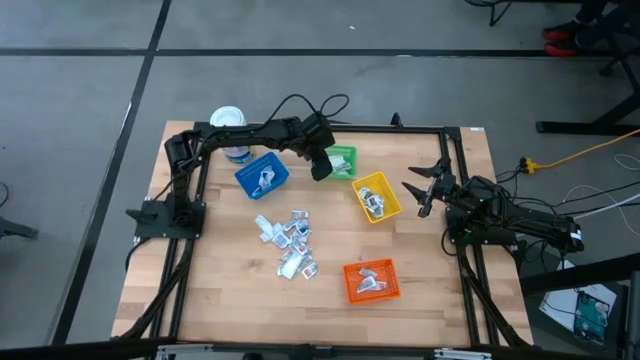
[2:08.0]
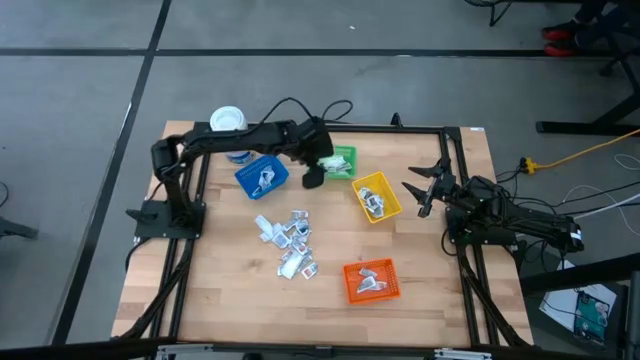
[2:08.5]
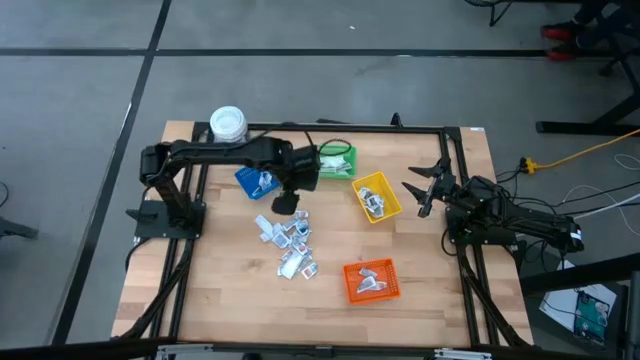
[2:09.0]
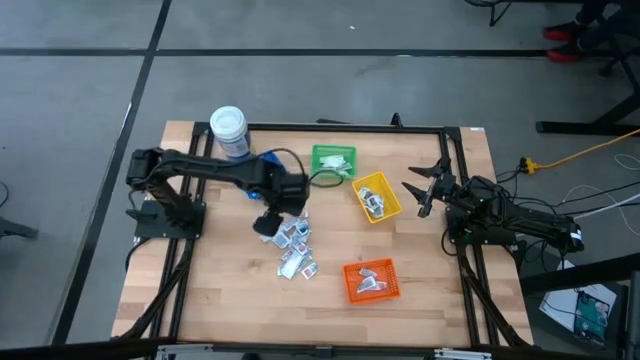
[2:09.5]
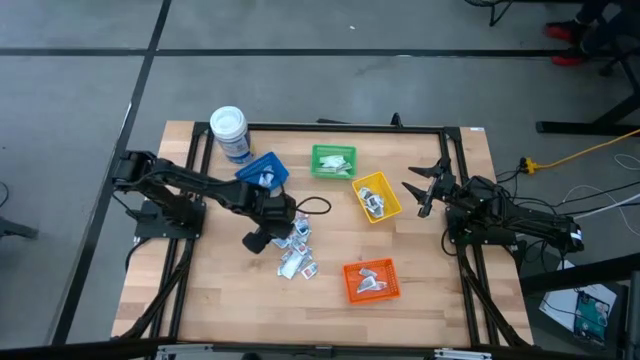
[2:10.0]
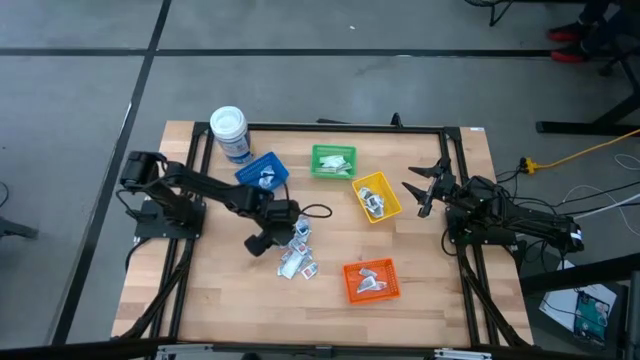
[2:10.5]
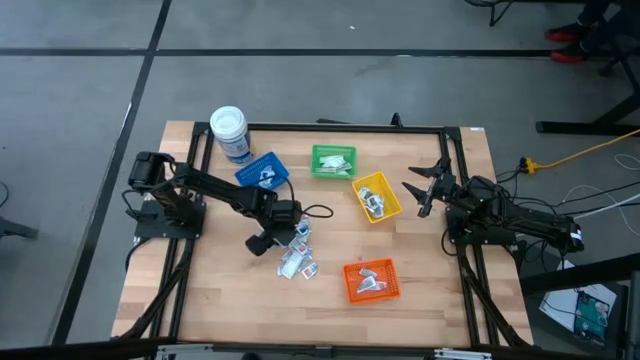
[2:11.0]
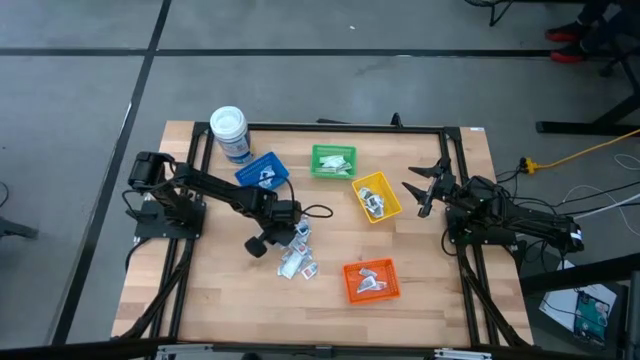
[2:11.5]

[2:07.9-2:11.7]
Task: Pick & Place First Aid Supplies
Put the white alcohol pad into the blue bin

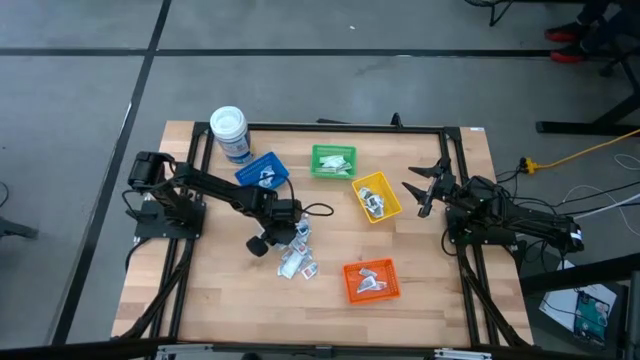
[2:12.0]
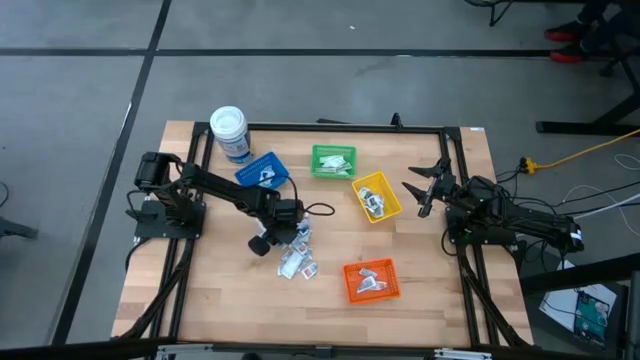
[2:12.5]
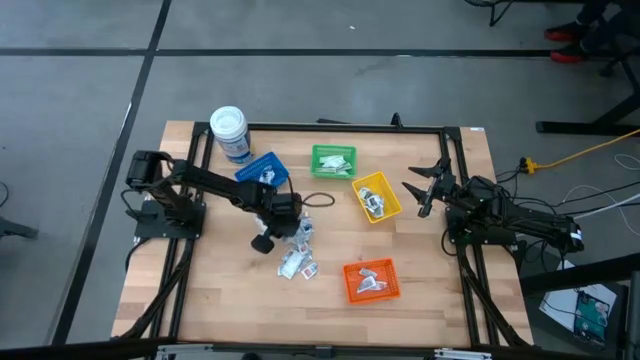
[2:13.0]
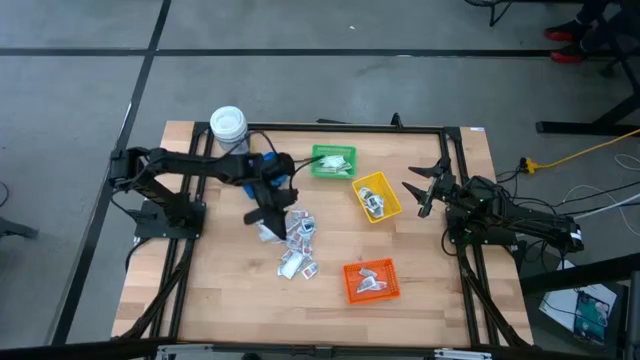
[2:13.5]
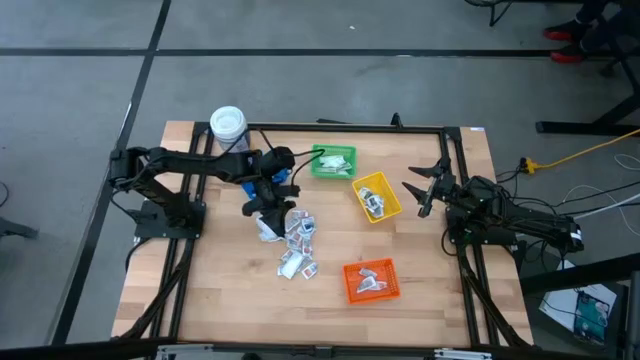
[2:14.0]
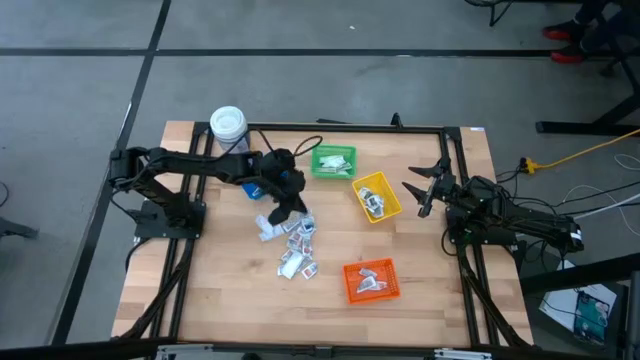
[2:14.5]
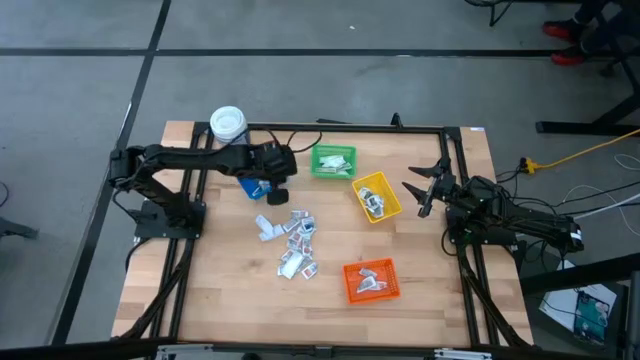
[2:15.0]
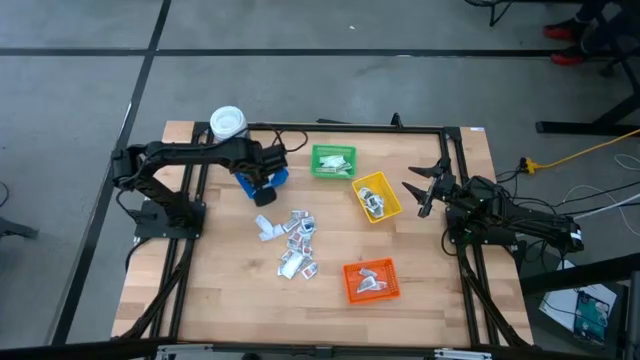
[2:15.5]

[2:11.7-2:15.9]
Put the white alcohol pad into the blue bin

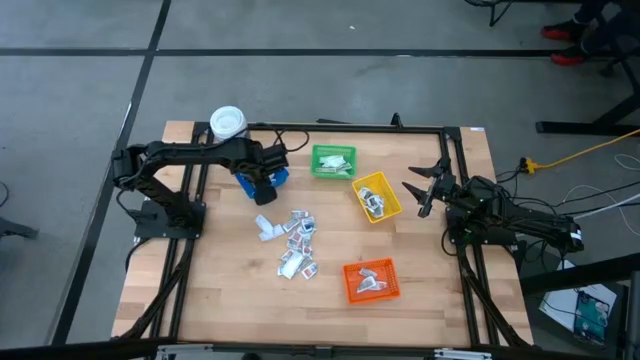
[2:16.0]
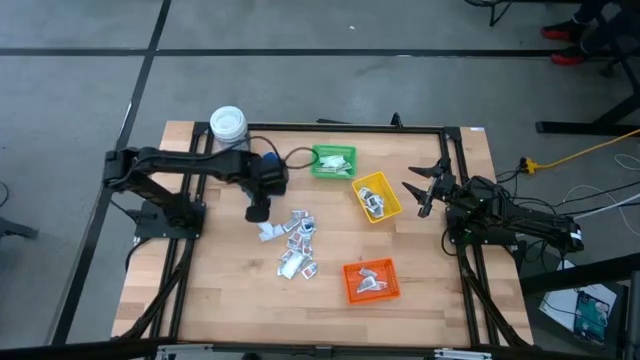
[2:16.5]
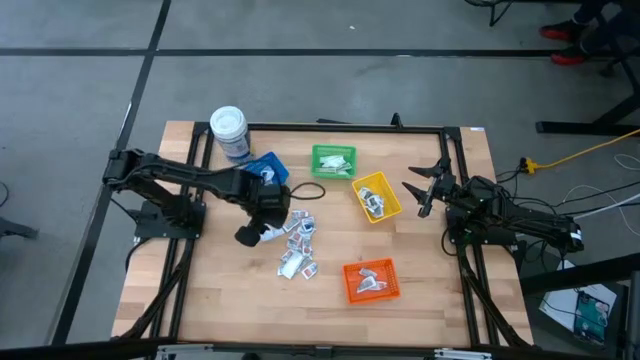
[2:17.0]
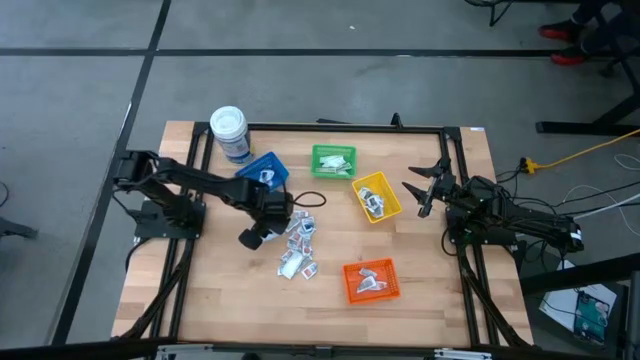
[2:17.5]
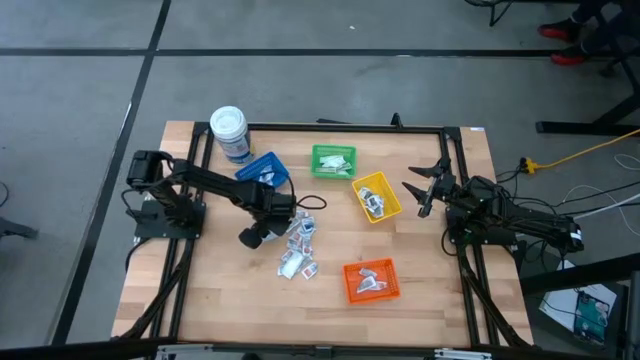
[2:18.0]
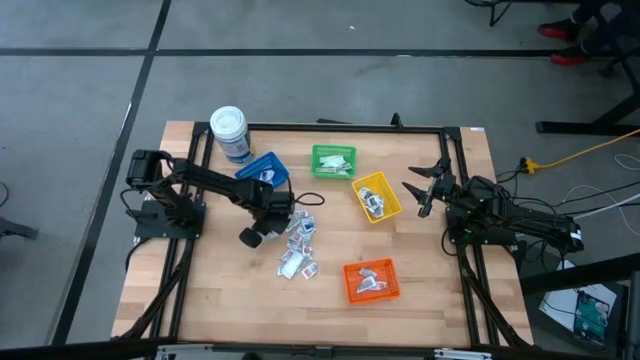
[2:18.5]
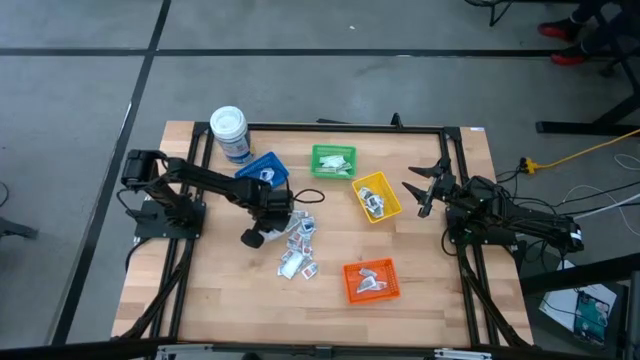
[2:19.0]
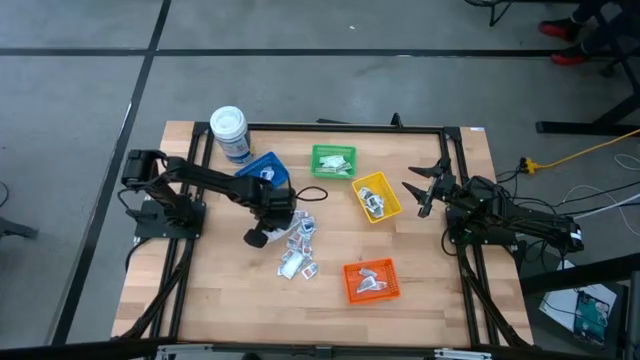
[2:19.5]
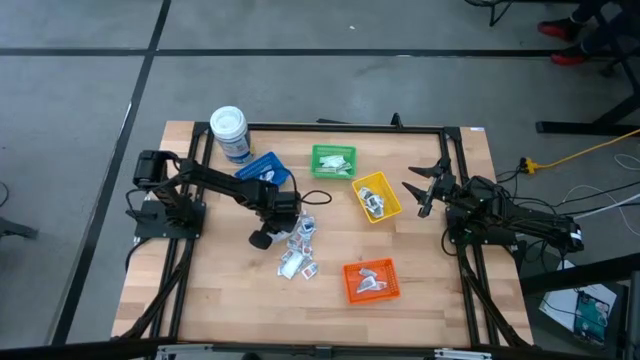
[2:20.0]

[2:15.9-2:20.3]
Put the white bandage into the green bin

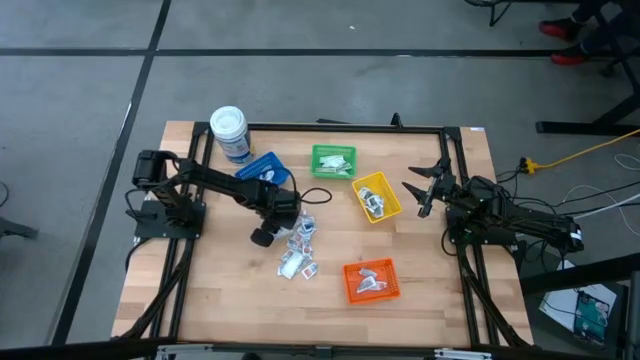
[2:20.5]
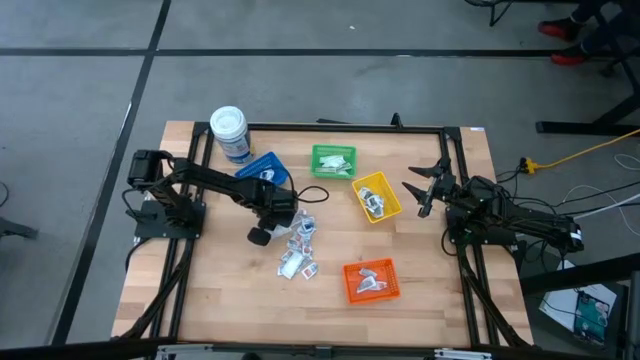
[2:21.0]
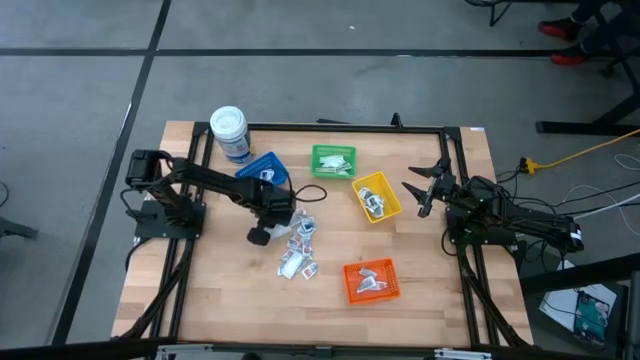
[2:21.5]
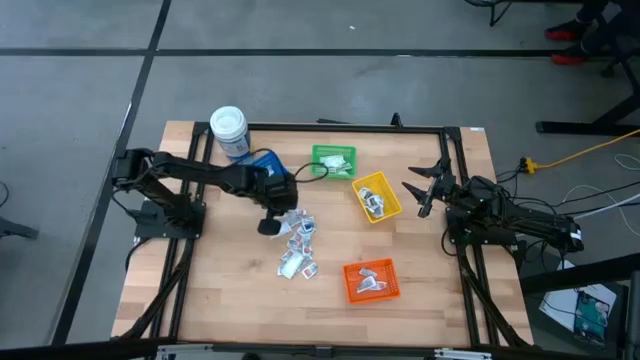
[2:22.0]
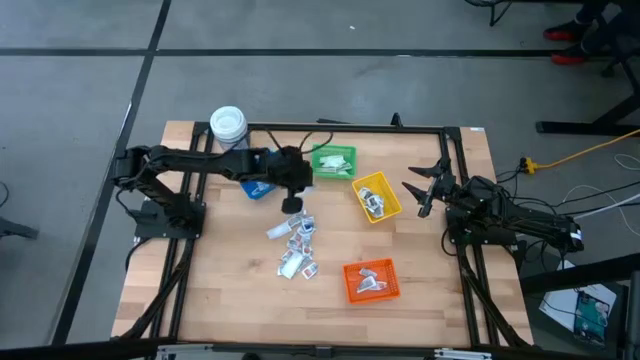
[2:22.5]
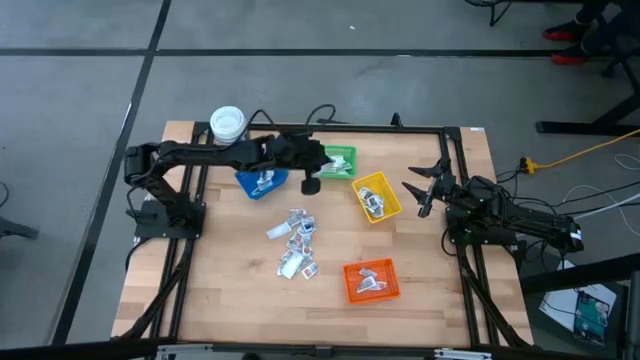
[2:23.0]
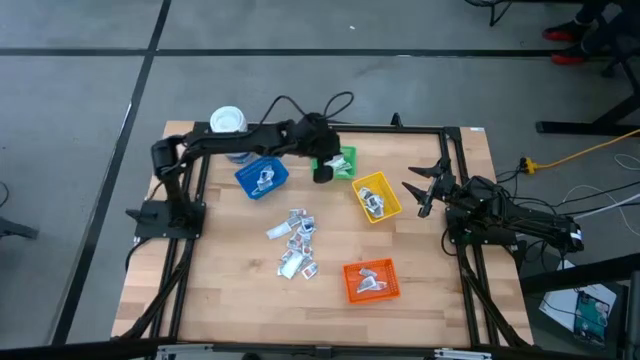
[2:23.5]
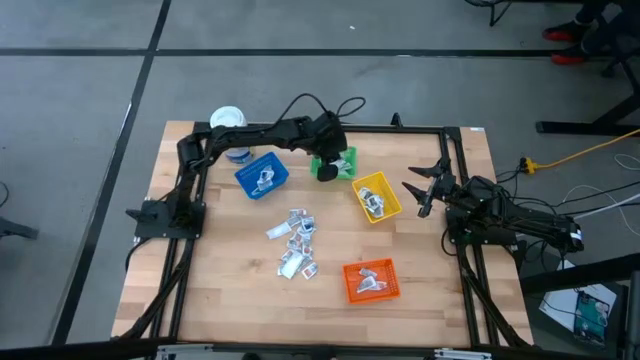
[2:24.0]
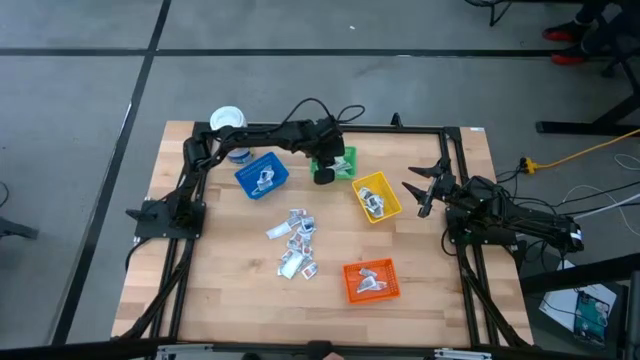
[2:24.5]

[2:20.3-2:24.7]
Put the white bandage into the green bin

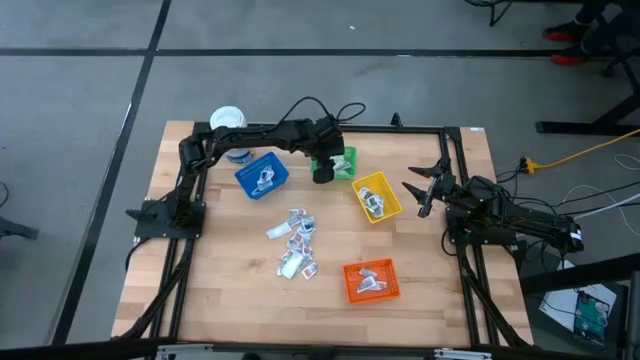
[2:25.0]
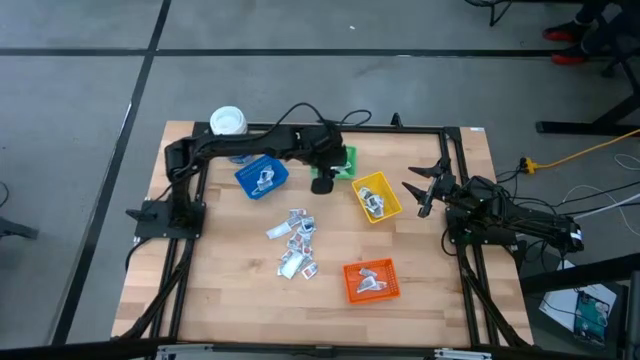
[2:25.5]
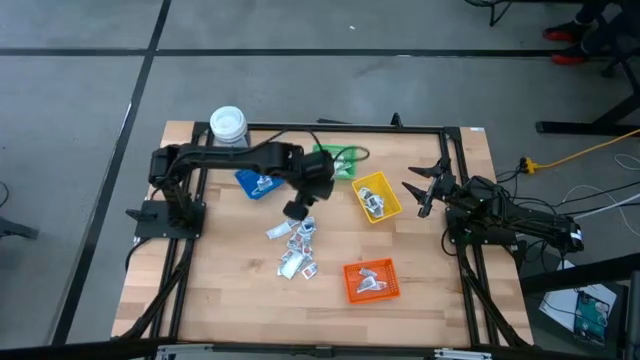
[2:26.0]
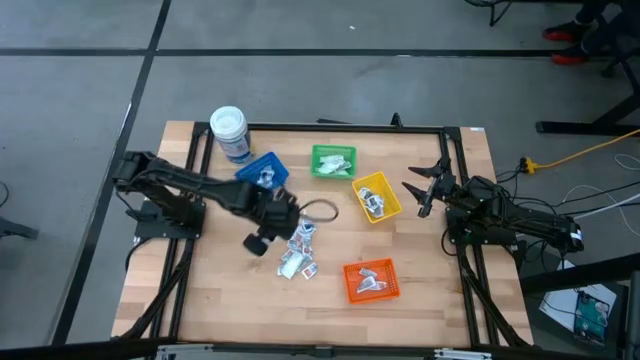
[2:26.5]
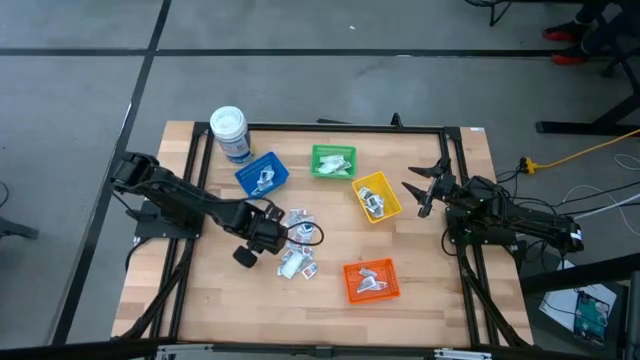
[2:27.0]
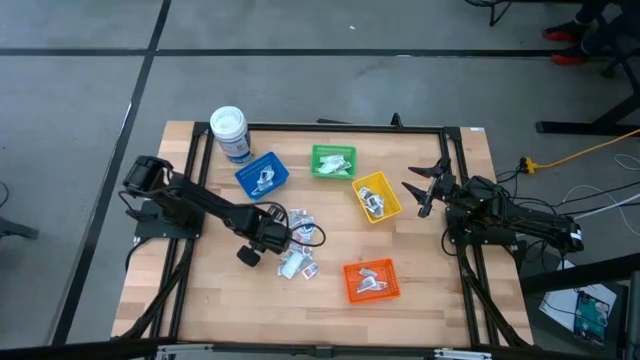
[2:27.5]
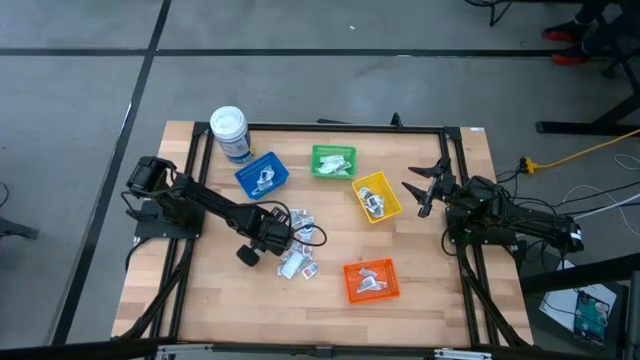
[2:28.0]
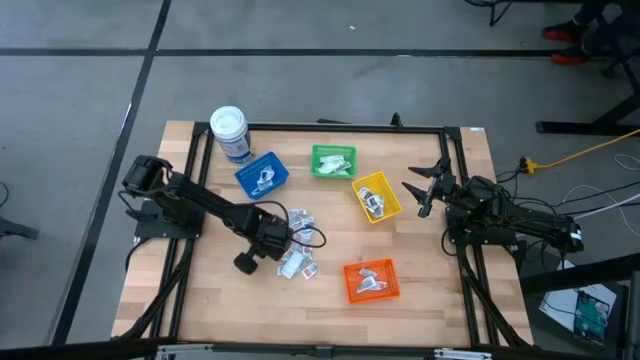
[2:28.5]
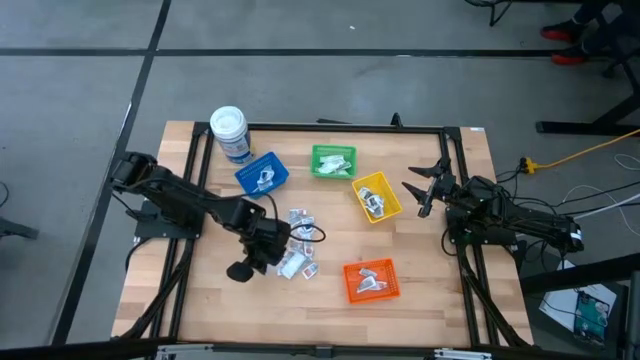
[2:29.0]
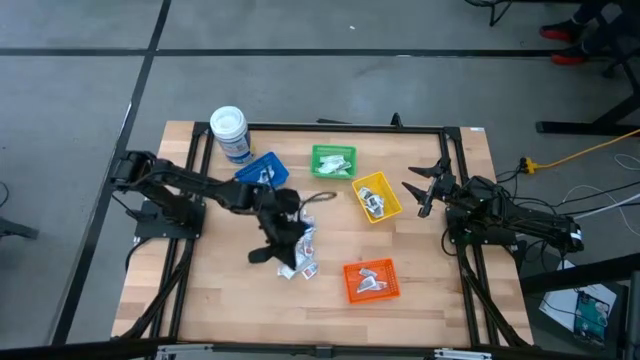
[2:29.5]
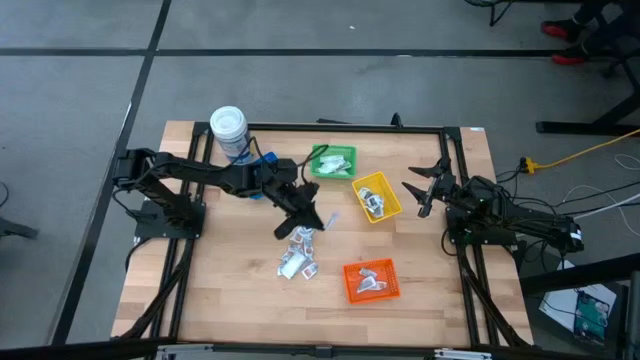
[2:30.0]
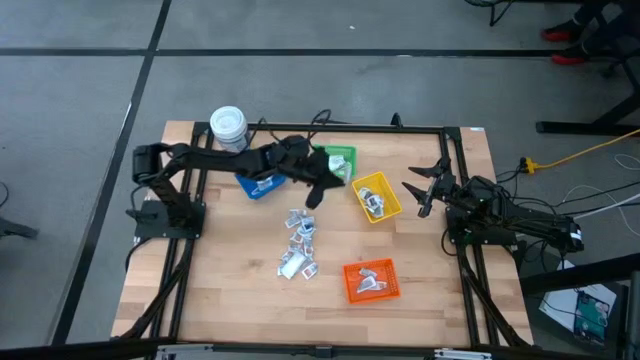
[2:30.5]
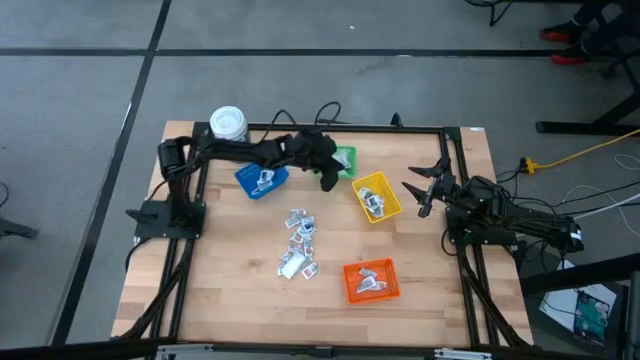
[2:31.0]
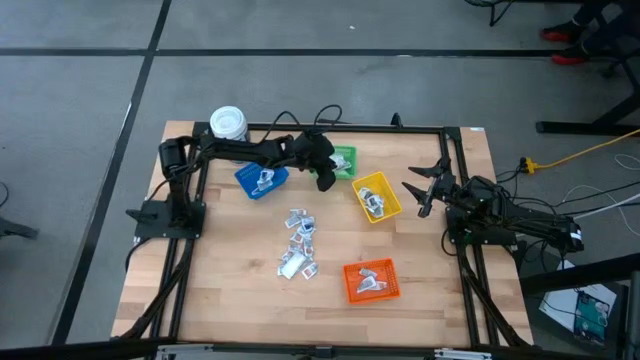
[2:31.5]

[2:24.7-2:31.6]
Put the white bandage into the green bin
